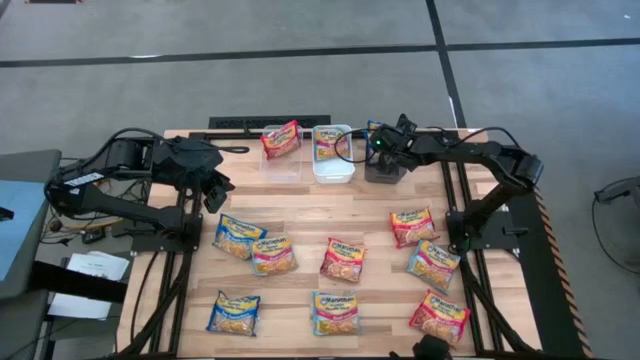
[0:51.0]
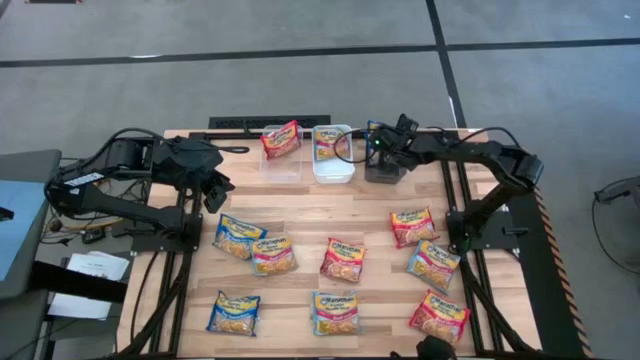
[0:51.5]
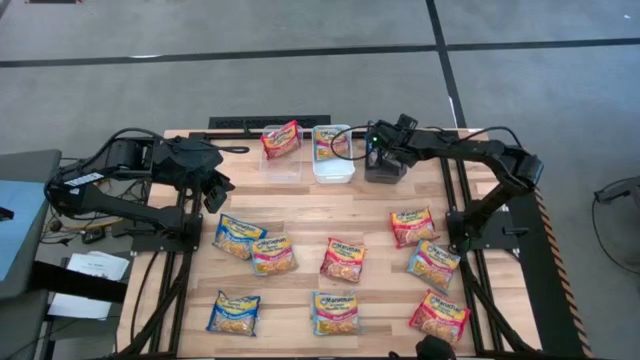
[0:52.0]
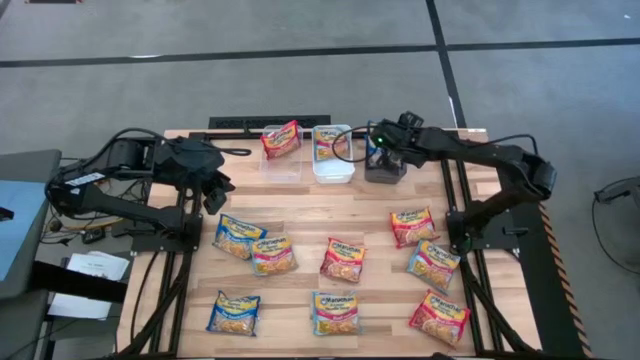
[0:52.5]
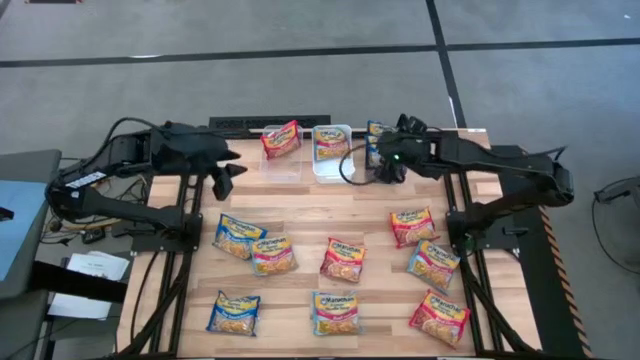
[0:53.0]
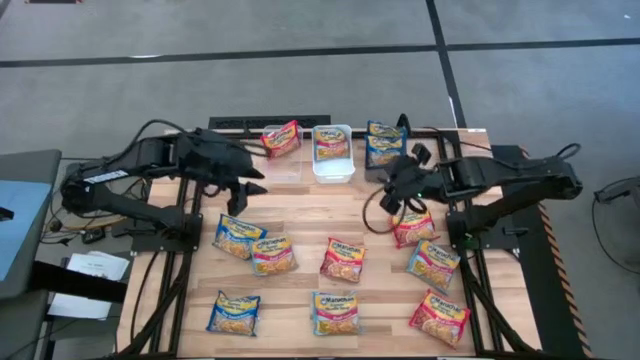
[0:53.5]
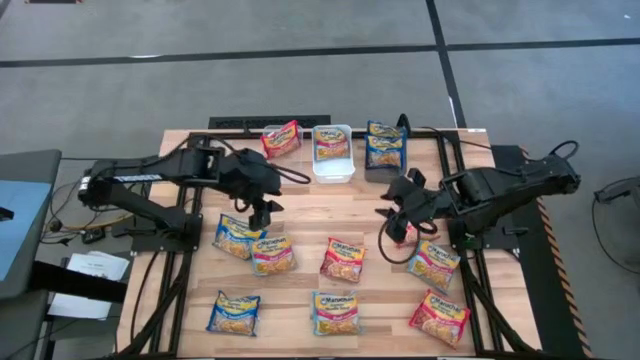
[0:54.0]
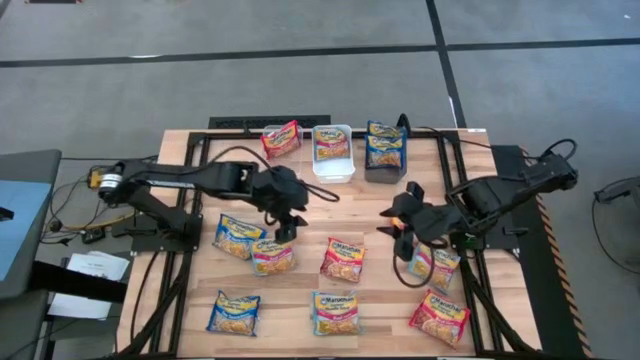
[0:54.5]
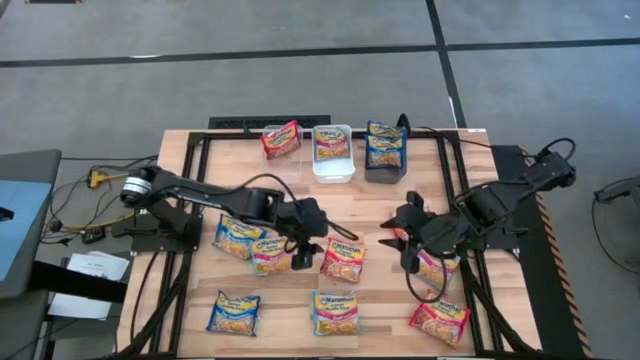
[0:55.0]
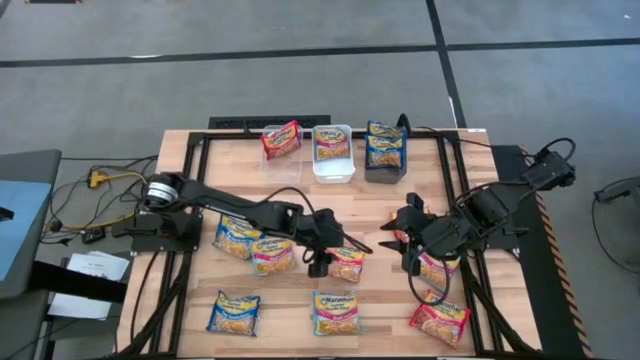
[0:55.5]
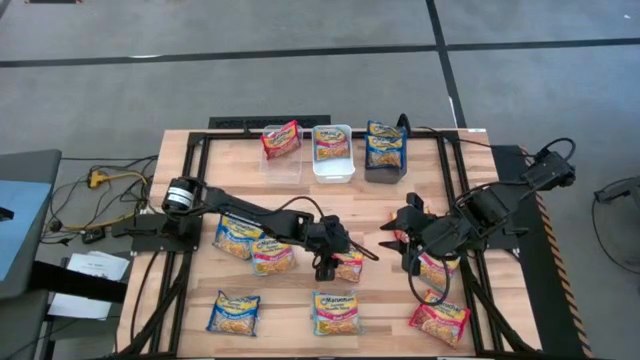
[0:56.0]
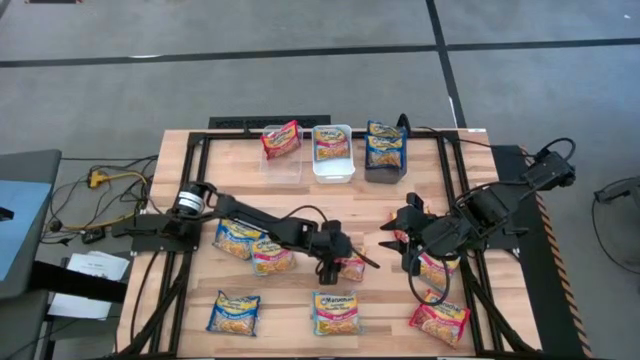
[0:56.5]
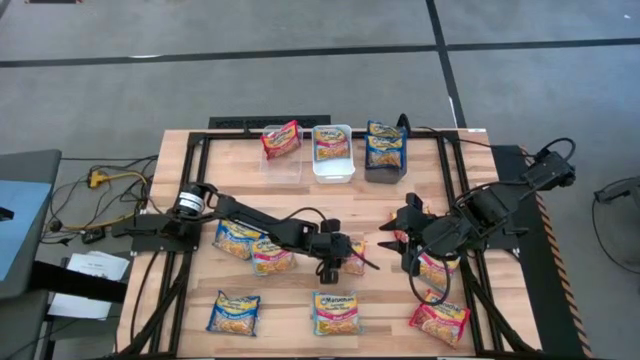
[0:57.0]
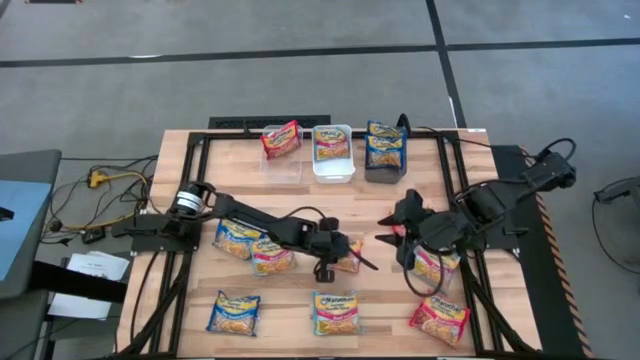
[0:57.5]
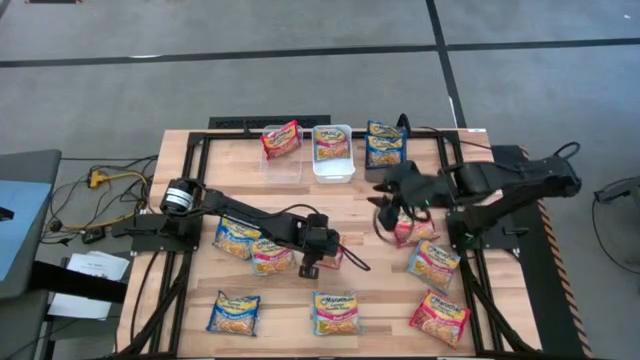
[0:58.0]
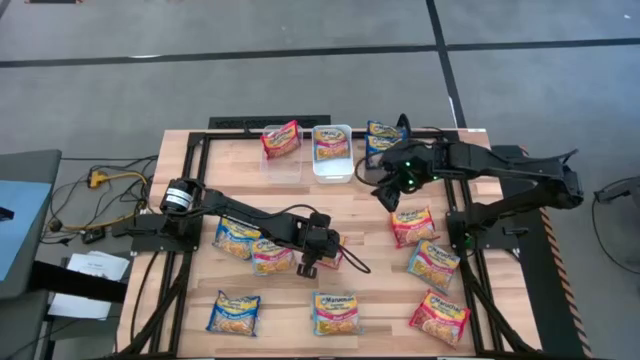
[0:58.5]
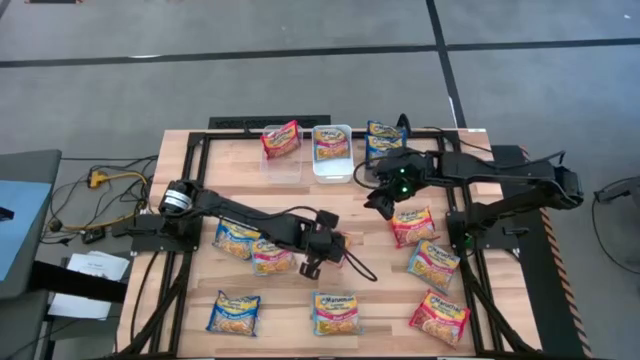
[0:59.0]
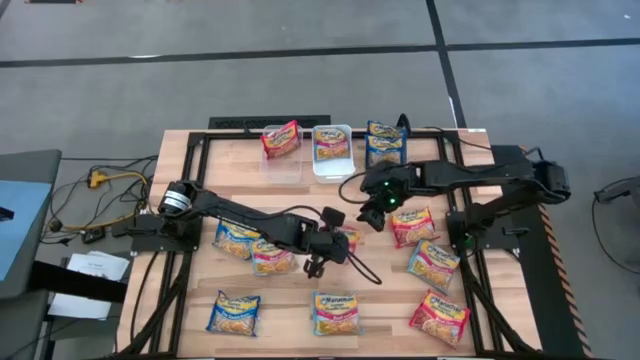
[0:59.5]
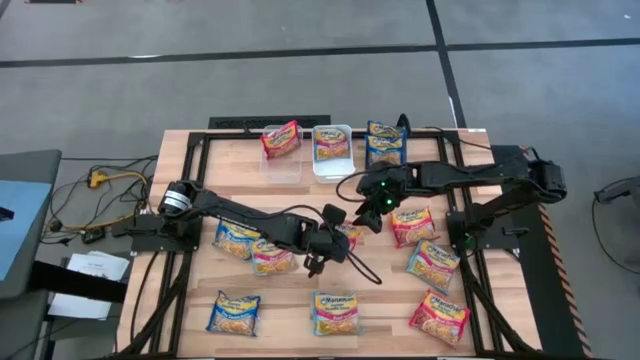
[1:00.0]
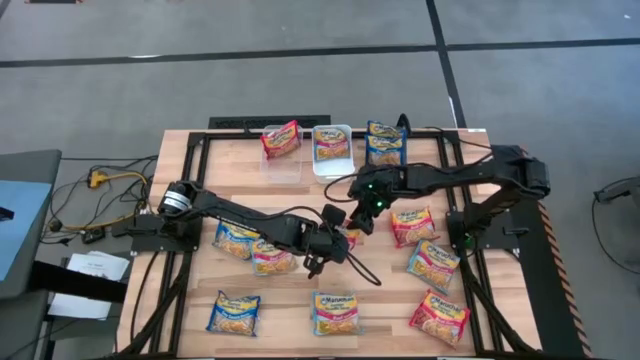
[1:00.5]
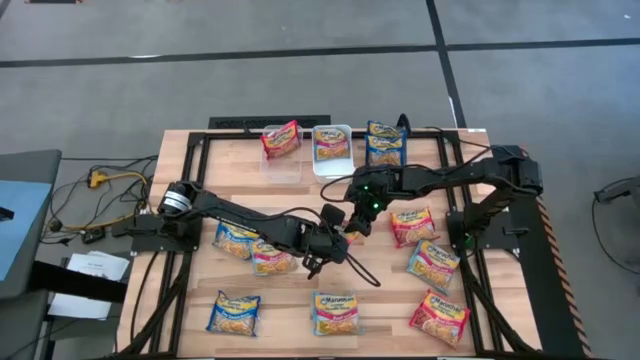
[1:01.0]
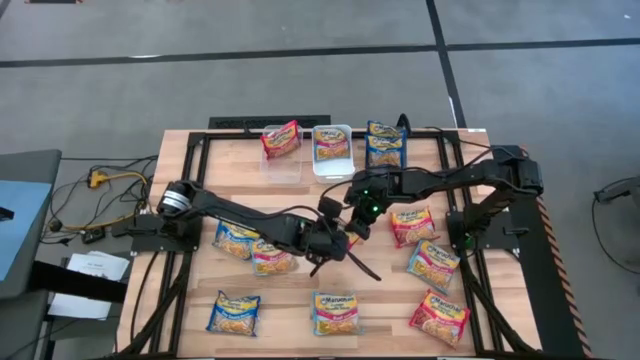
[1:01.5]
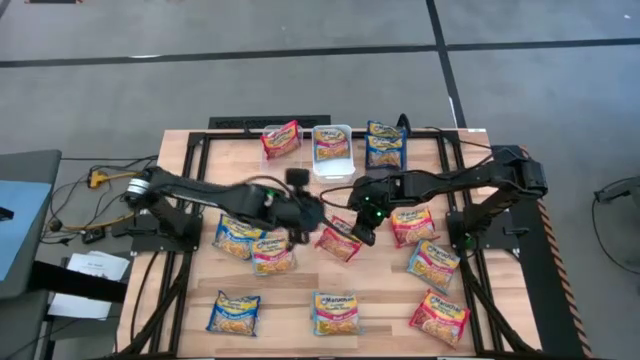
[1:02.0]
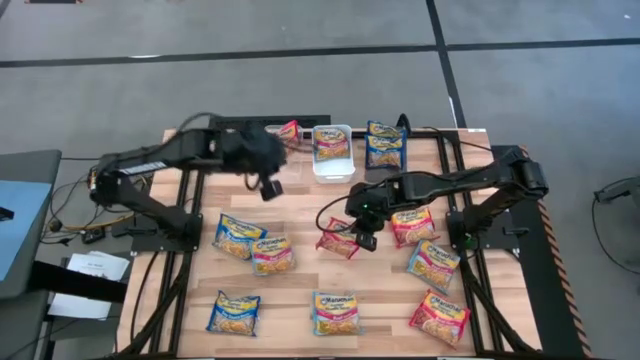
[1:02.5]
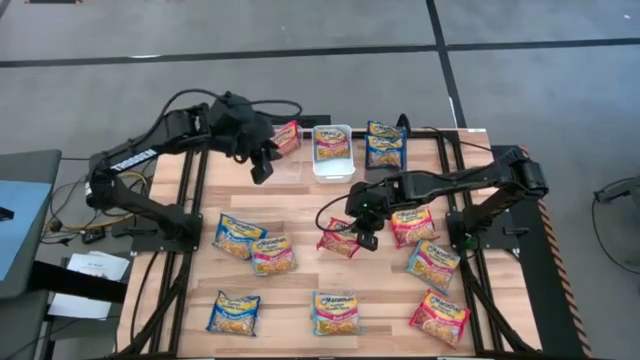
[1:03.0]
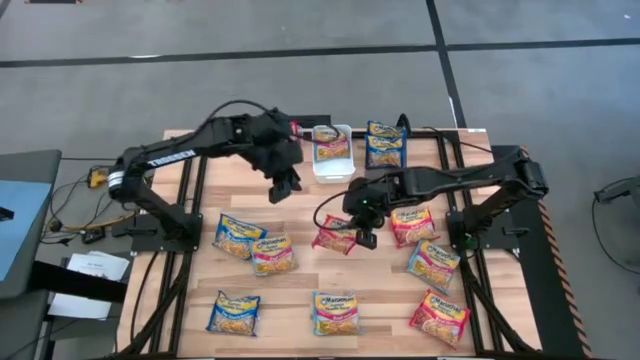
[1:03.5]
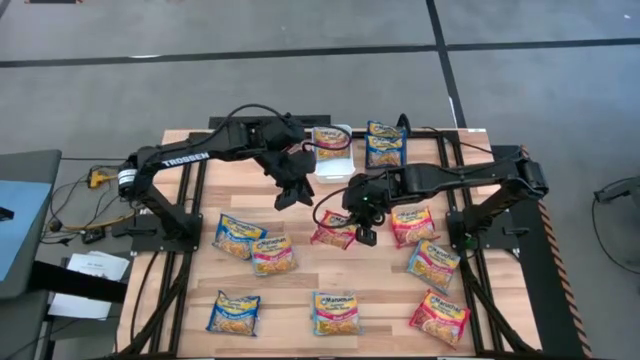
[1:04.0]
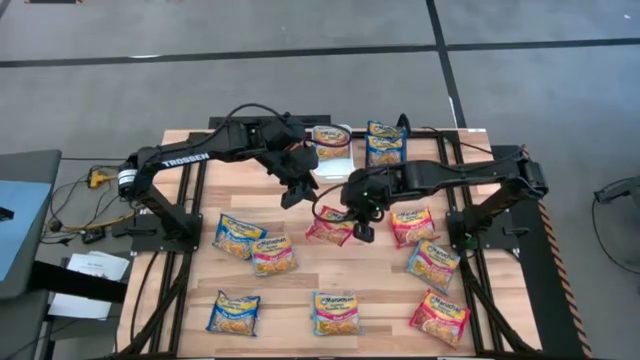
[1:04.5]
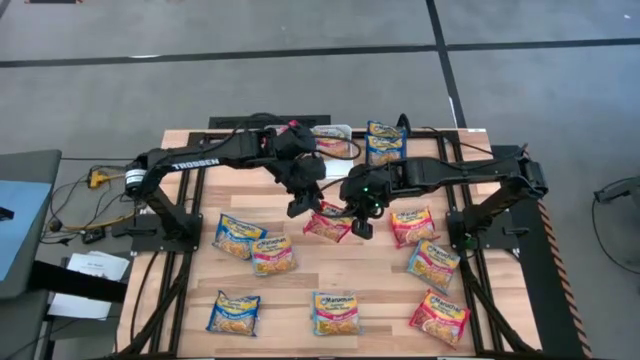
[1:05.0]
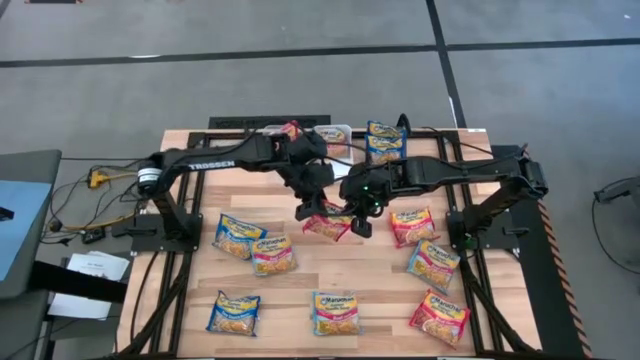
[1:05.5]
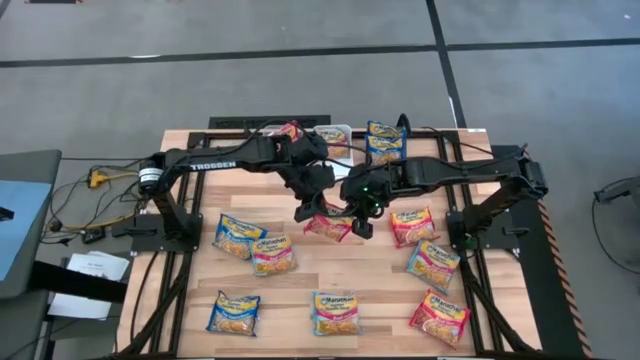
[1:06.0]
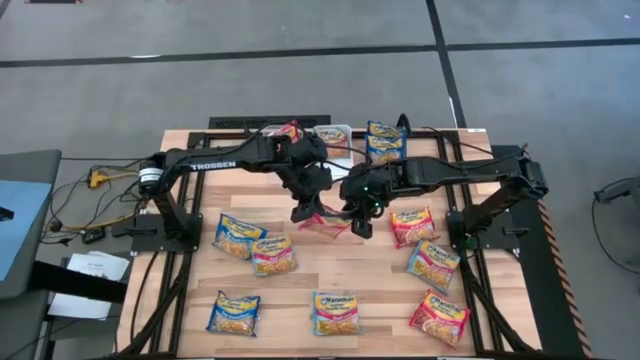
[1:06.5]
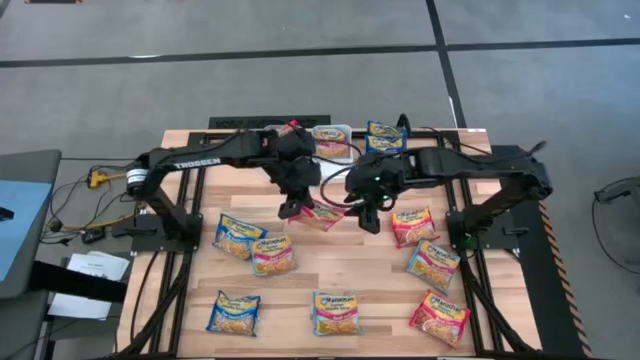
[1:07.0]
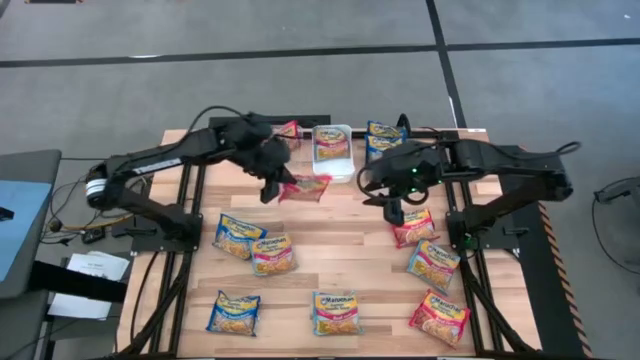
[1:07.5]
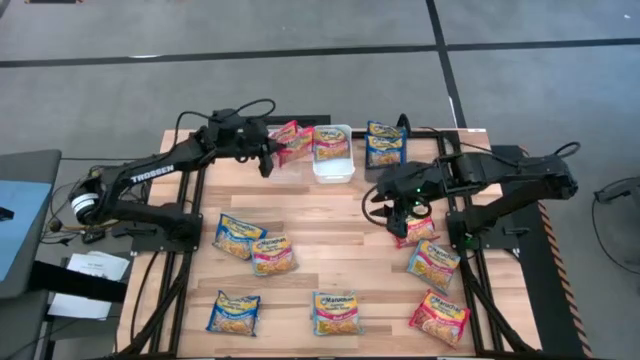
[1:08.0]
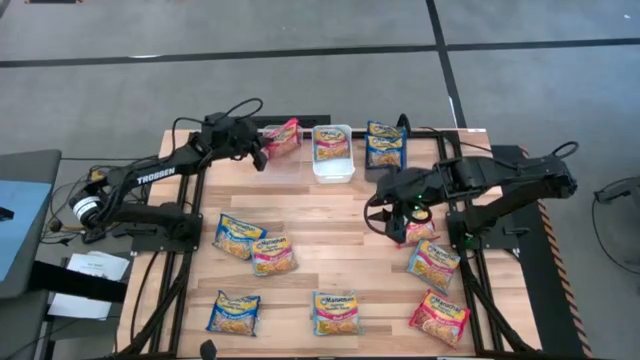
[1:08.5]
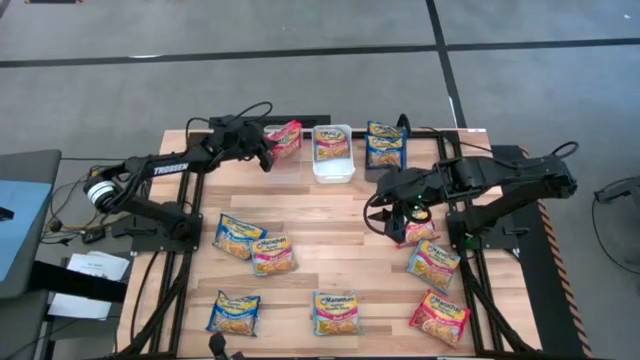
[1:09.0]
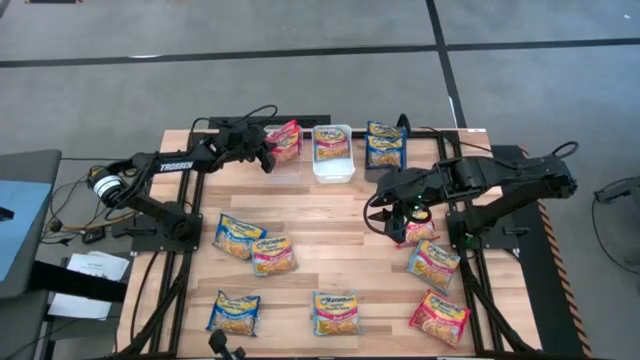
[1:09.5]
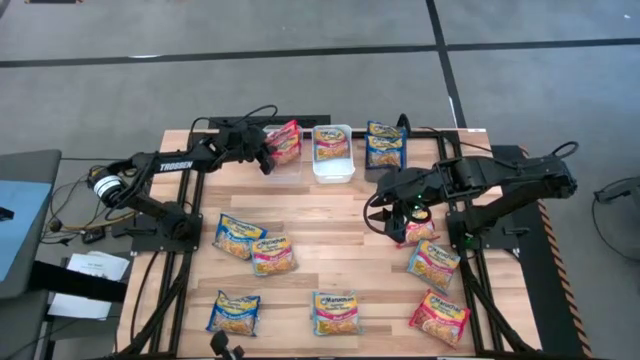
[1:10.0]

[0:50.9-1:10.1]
Task: Sort Maruchan noodles
Put the red noodle pack into the transparent bin
